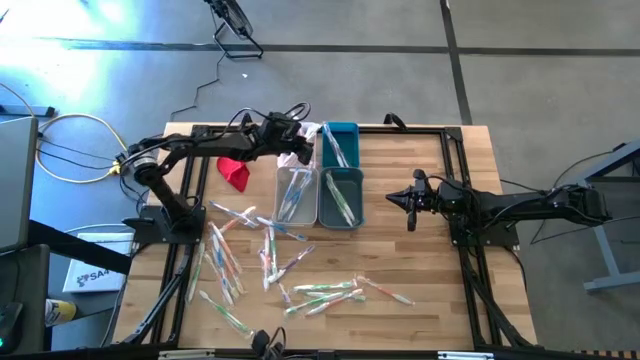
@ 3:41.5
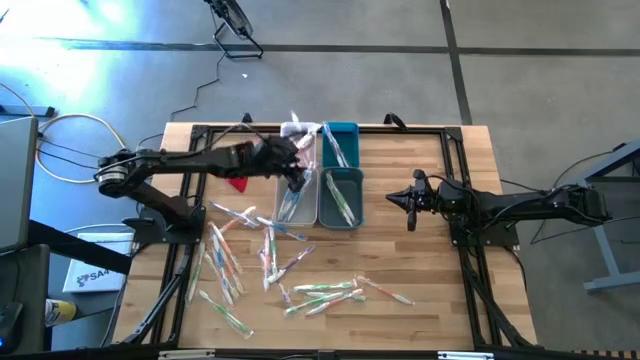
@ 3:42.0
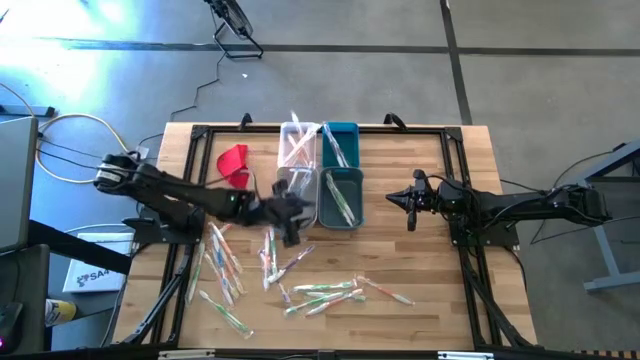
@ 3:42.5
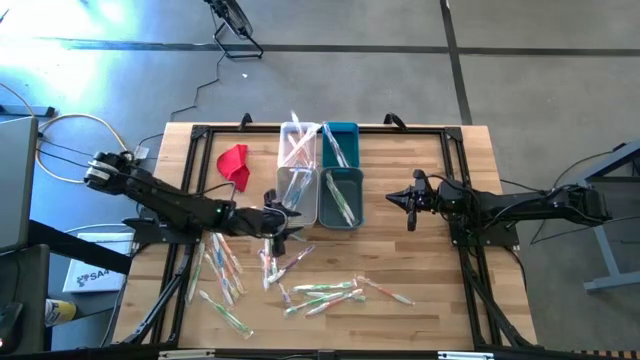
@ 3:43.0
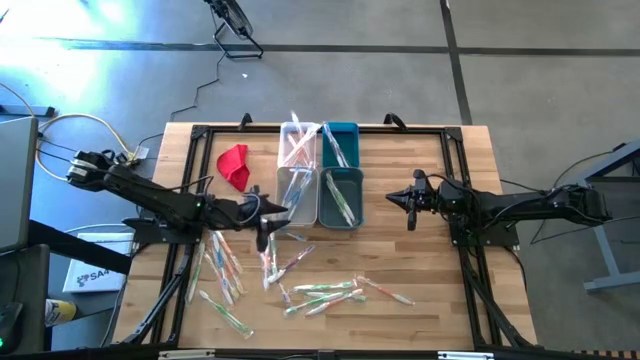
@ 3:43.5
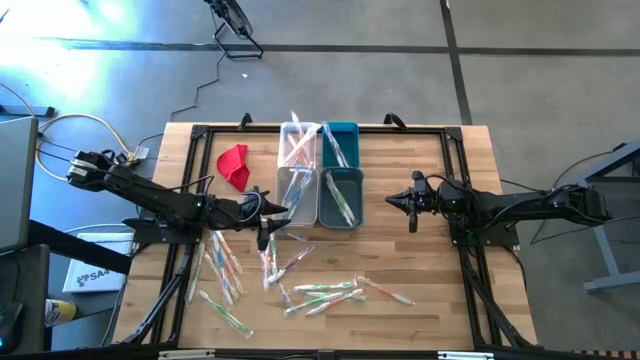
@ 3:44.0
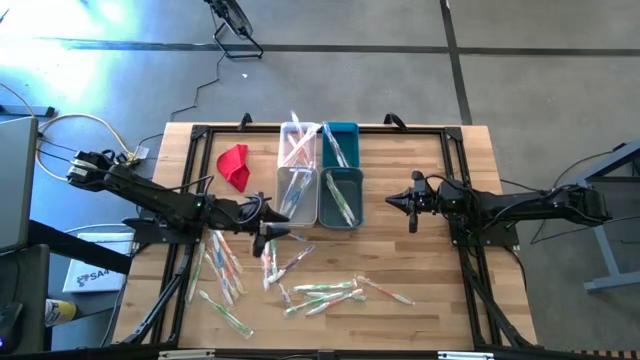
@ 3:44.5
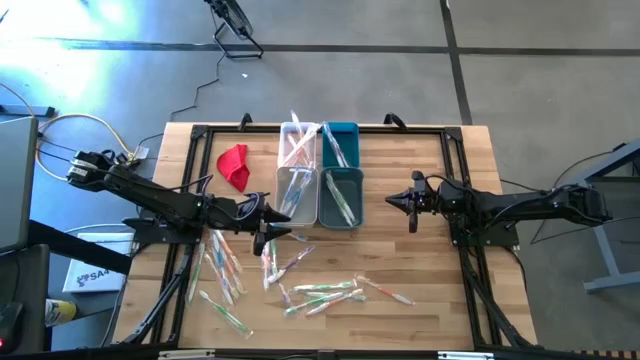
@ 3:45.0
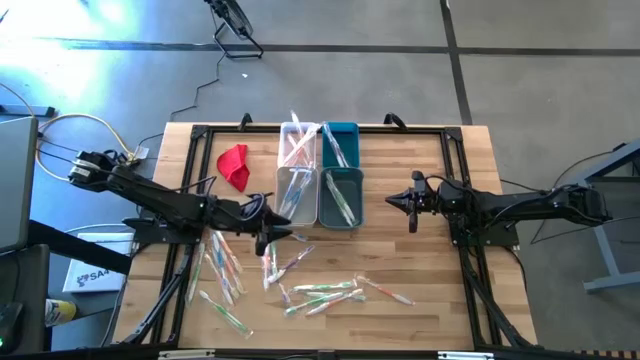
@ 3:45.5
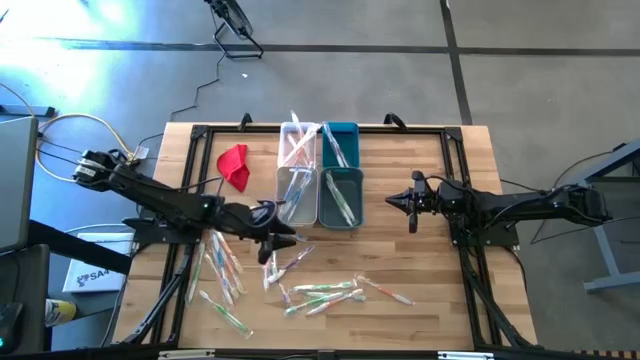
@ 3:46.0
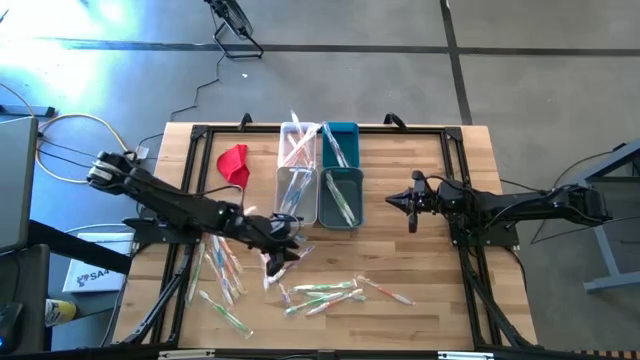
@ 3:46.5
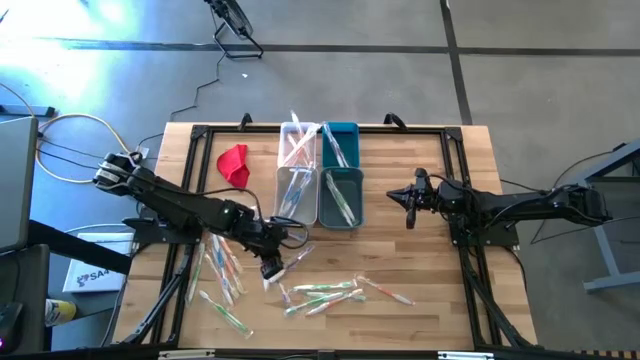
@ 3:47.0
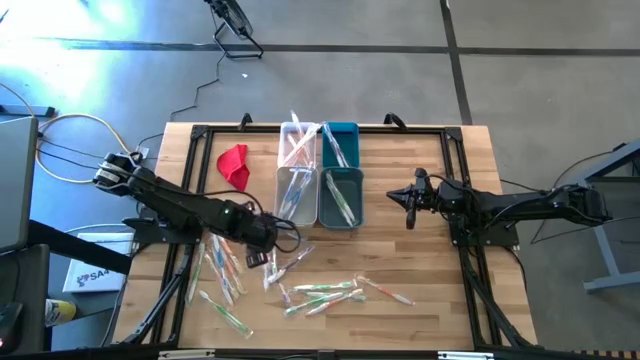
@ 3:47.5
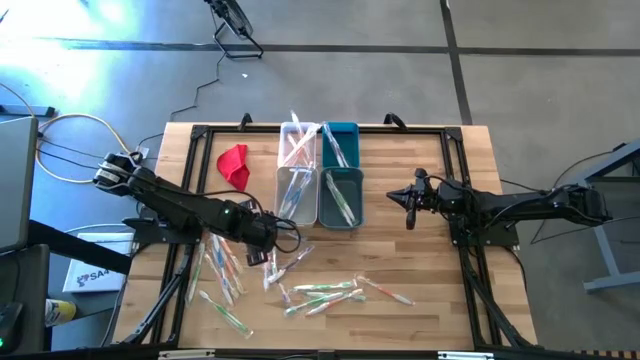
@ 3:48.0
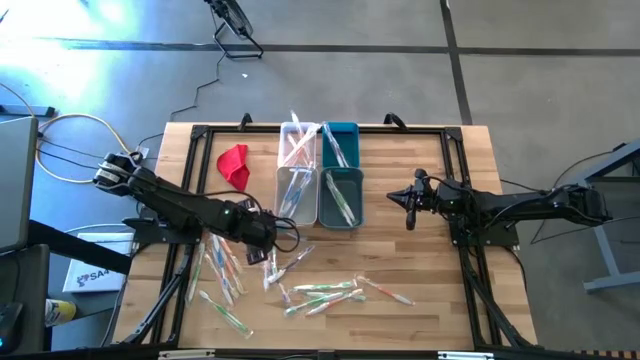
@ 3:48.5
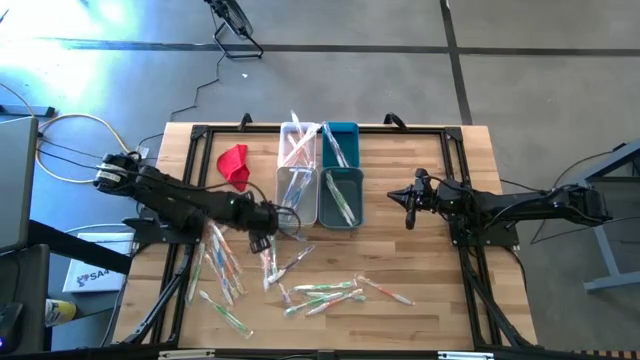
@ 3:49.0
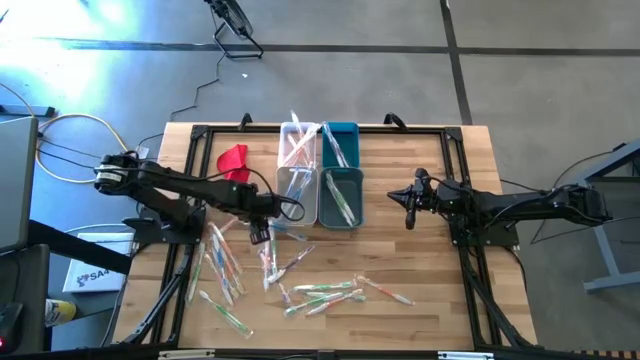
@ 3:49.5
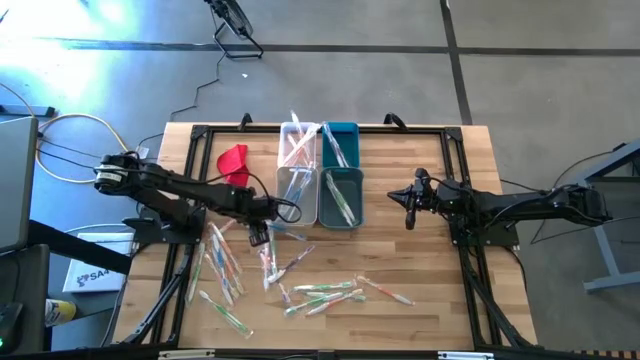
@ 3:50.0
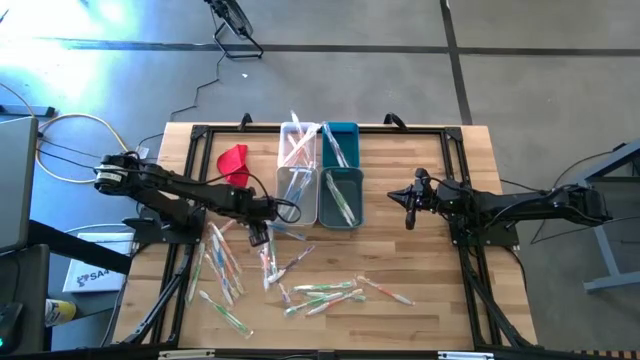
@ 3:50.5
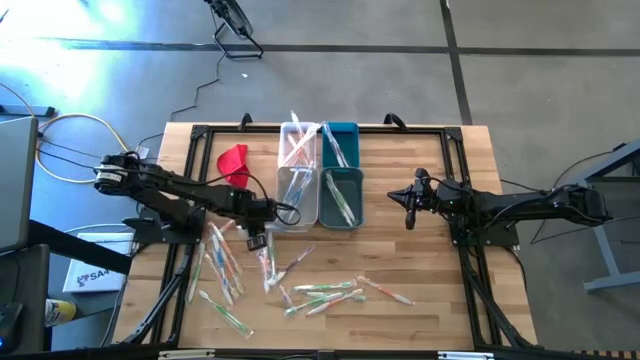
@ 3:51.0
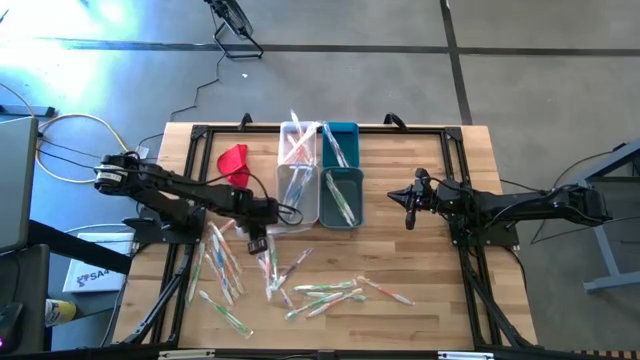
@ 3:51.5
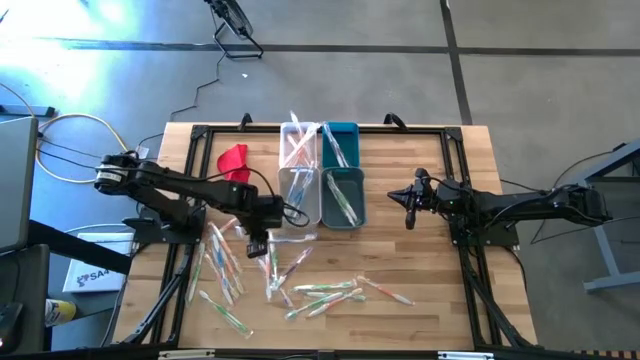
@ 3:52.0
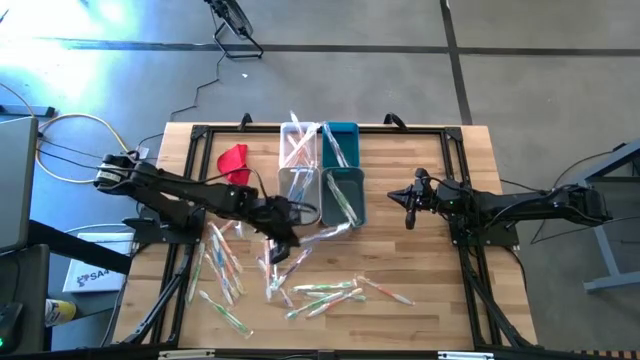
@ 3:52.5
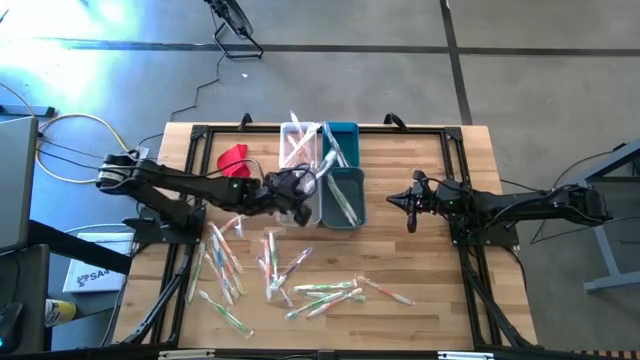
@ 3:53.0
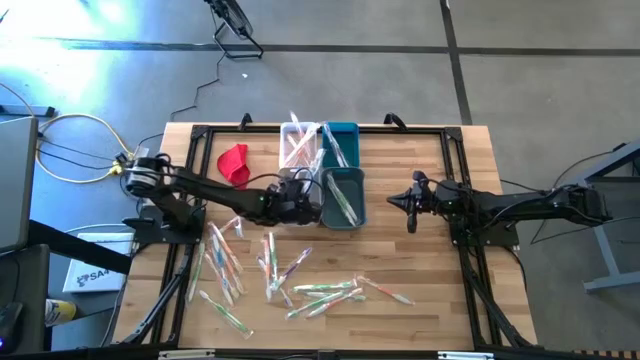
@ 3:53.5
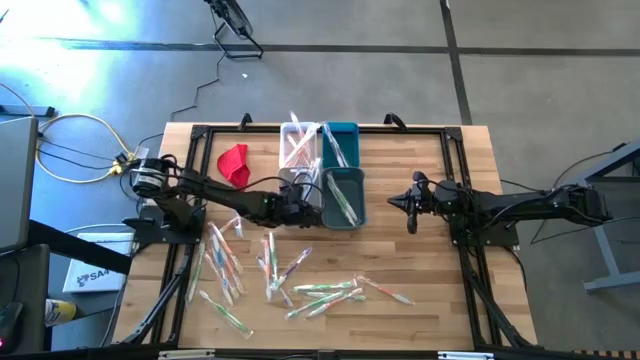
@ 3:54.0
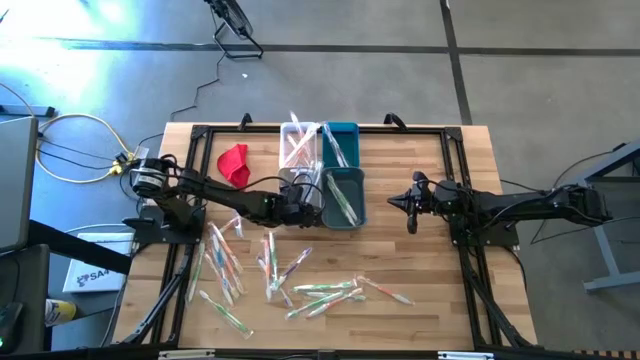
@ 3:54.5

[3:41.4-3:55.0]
Task: Pick & Place Toothbrushes
Put the blue toothbrush into the gray bin

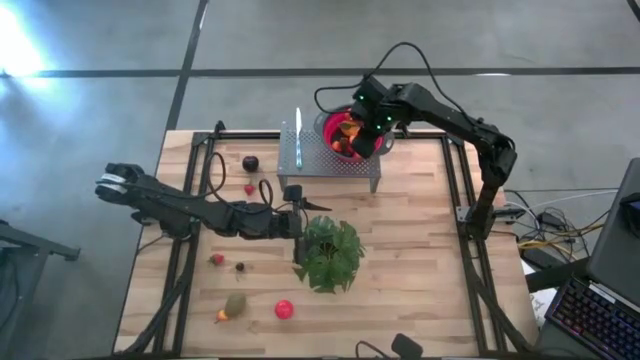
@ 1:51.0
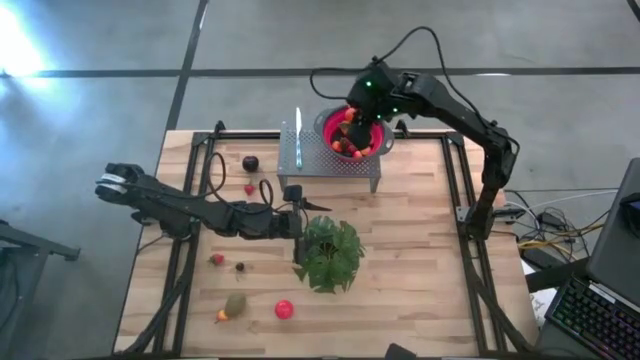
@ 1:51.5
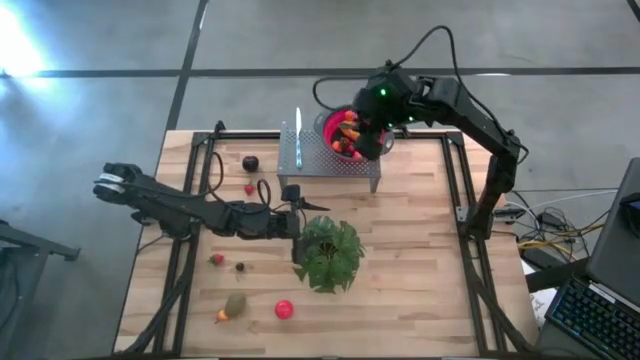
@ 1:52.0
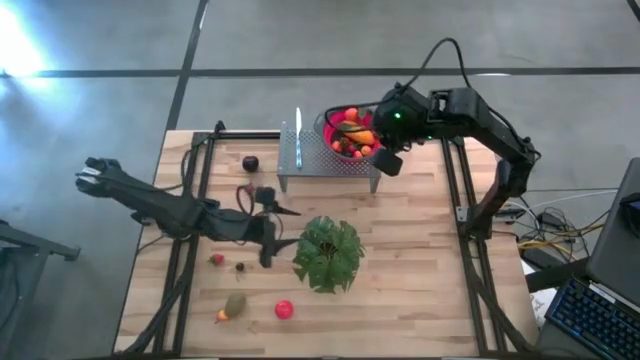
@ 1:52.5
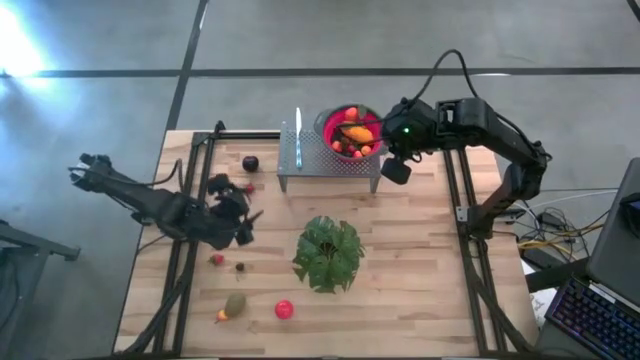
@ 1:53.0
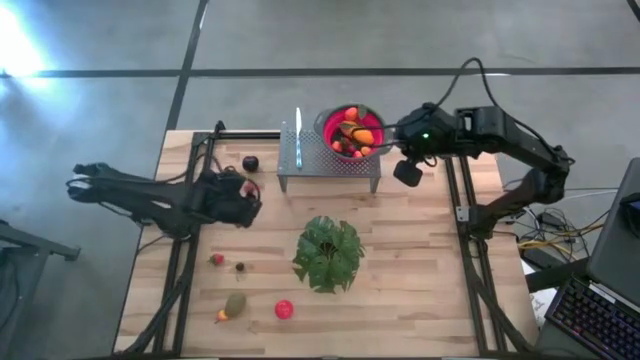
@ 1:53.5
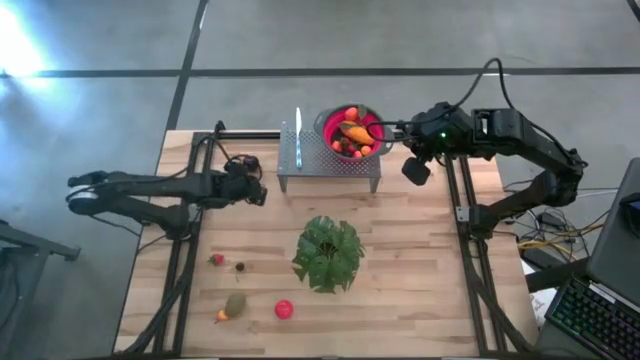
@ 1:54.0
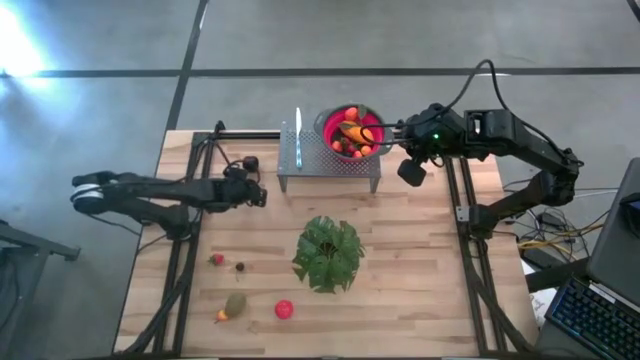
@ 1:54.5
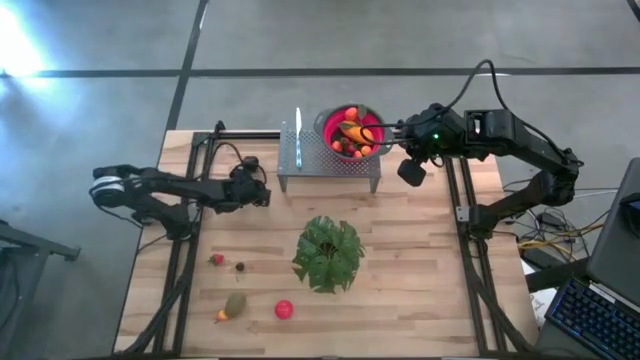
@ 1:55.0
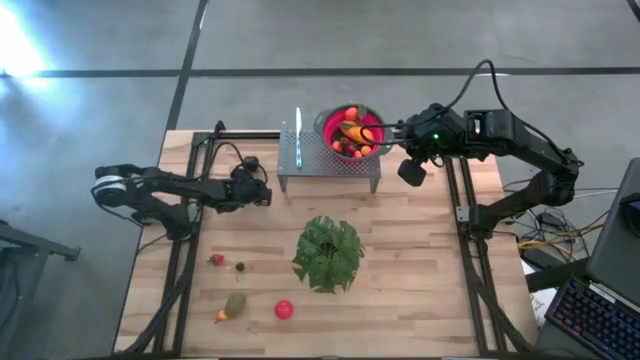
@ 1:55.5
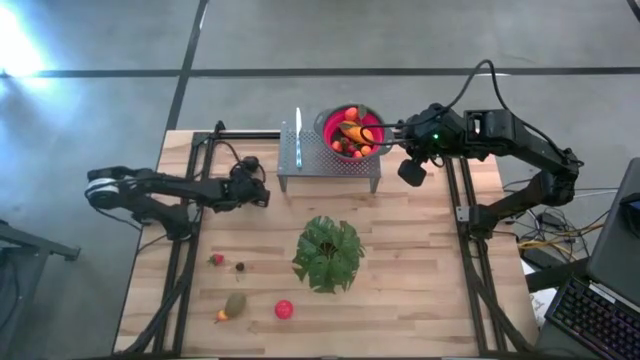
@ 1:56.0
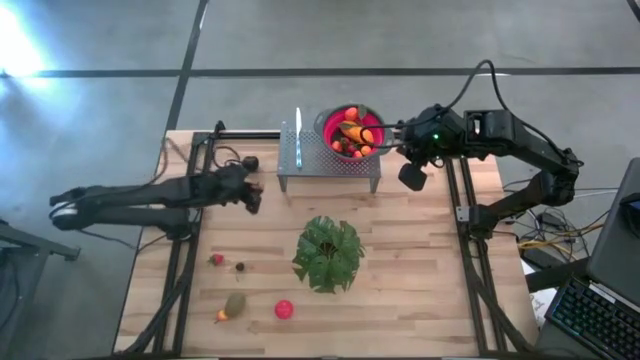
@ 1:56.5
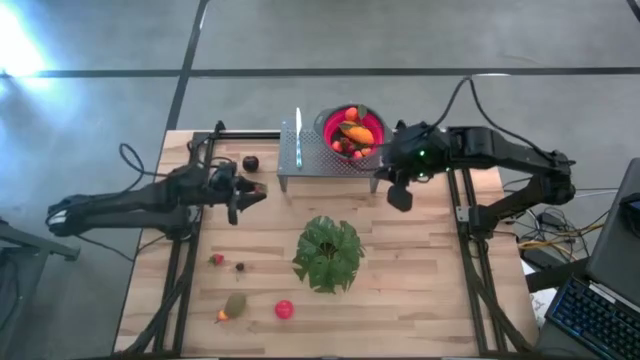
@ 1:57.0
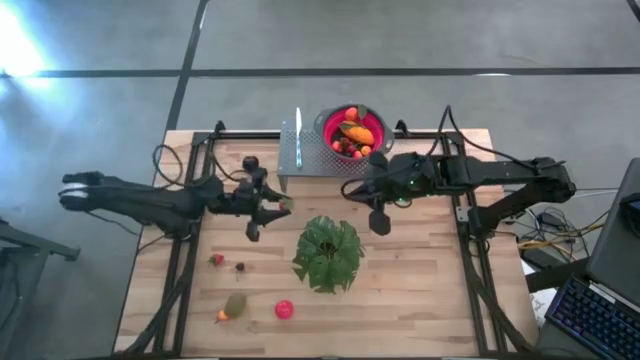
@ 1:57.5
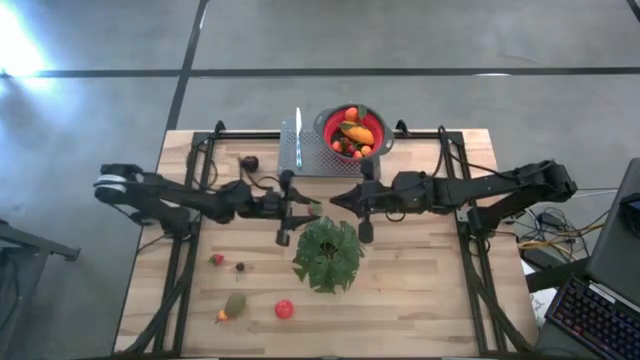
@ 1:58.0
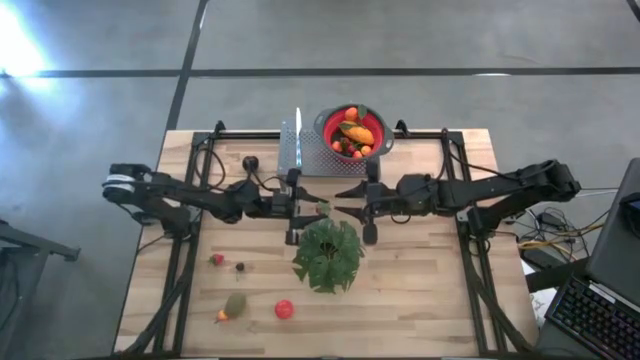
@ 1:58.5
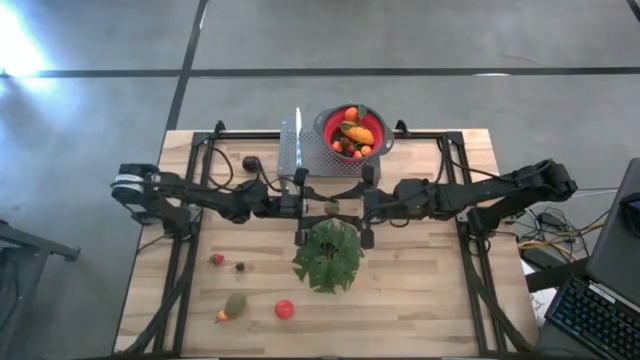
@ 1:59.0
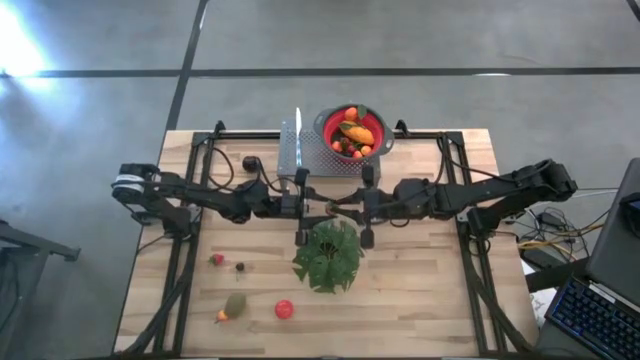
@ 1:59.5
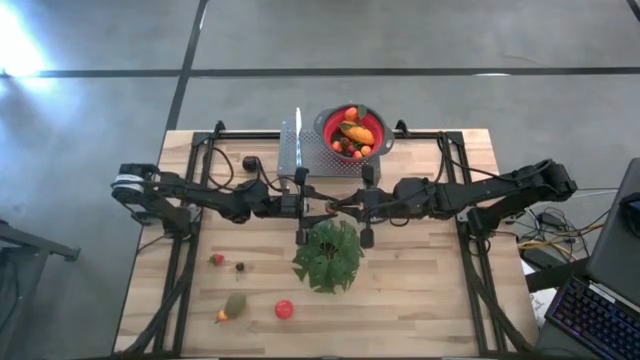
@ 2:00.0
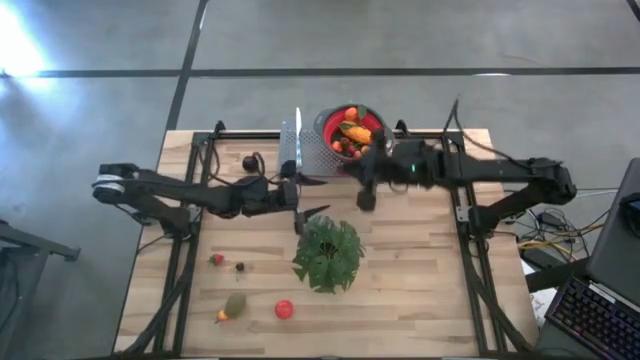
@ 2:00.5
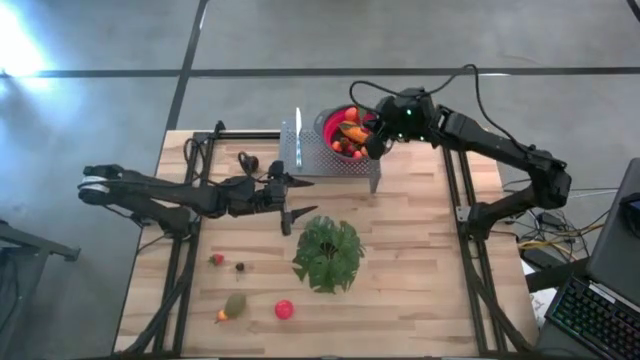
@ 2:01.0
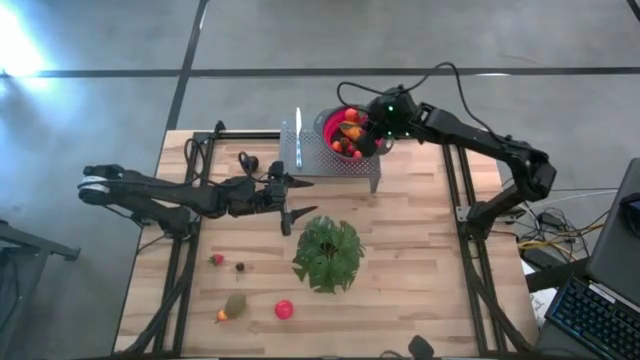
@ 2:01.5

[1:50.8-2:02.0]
Task: Pick & Place Fruit
Put the red strawberry into the red strainer bowl on the shelf
